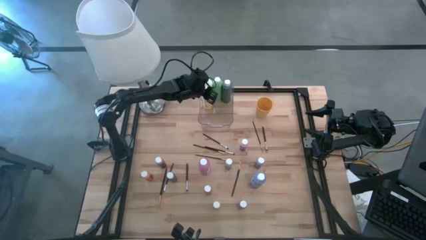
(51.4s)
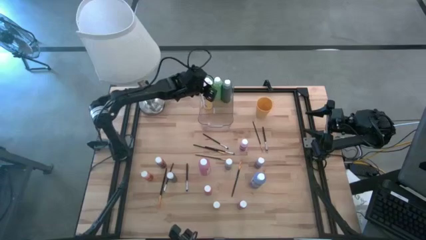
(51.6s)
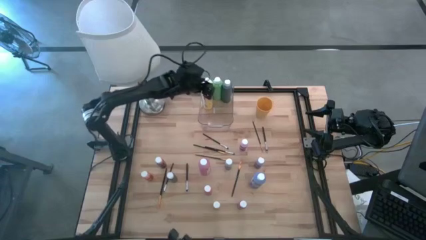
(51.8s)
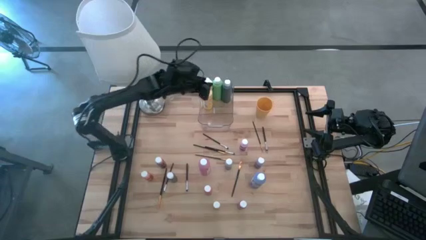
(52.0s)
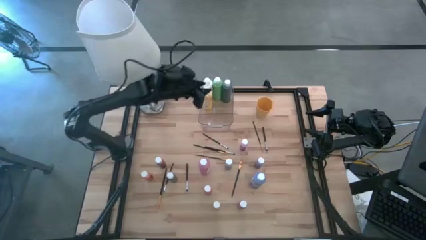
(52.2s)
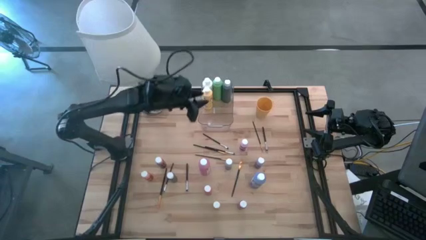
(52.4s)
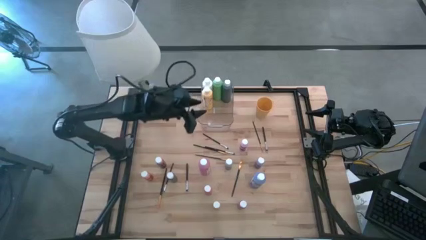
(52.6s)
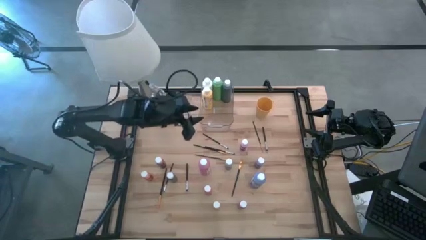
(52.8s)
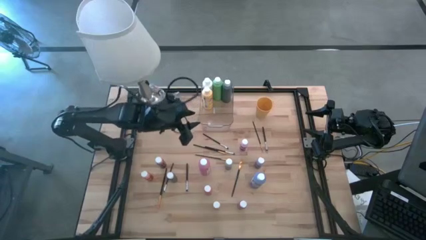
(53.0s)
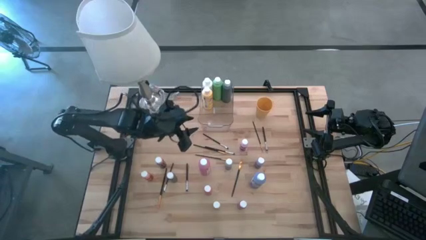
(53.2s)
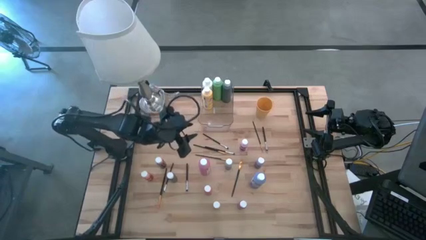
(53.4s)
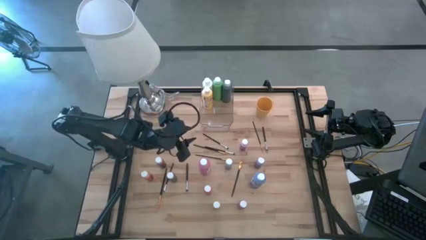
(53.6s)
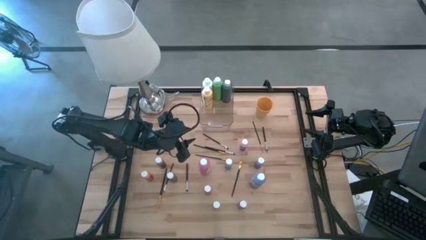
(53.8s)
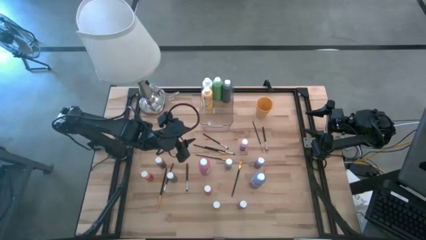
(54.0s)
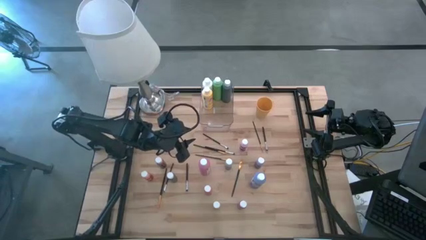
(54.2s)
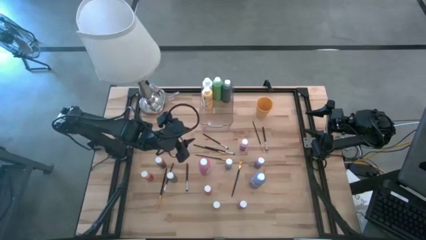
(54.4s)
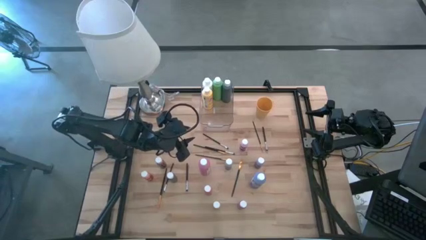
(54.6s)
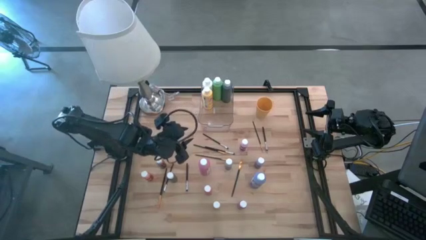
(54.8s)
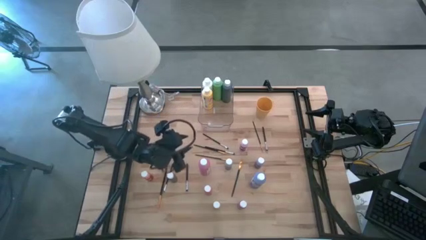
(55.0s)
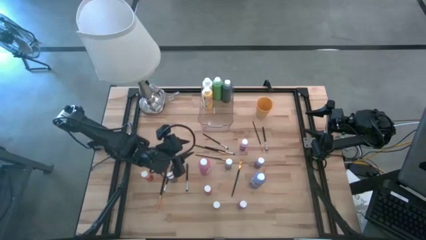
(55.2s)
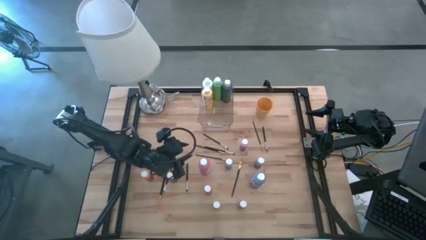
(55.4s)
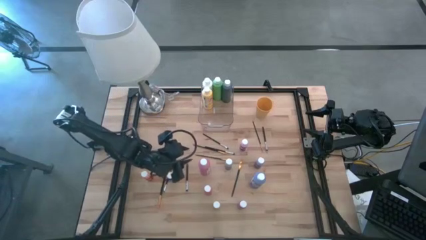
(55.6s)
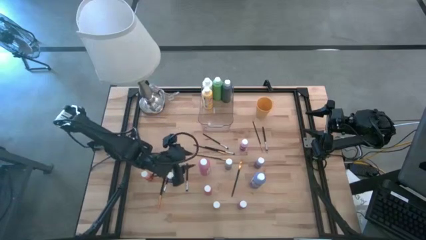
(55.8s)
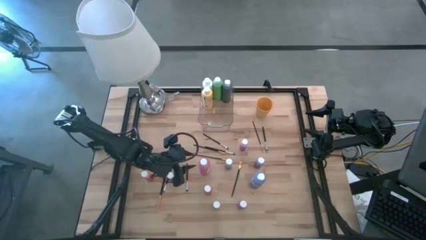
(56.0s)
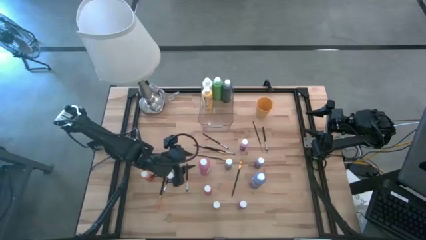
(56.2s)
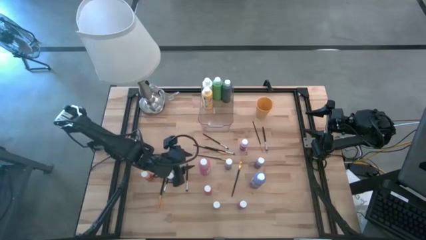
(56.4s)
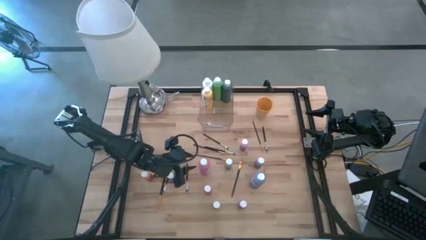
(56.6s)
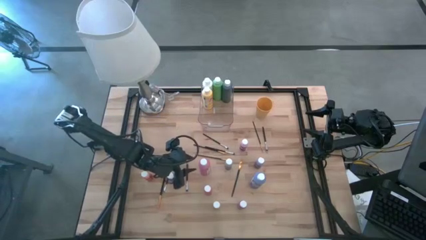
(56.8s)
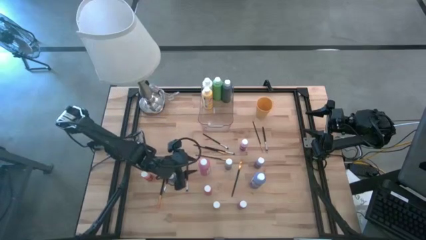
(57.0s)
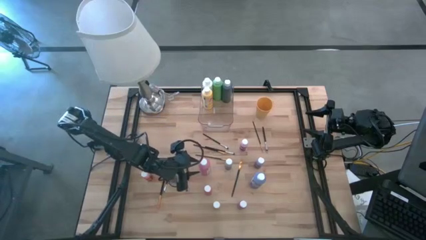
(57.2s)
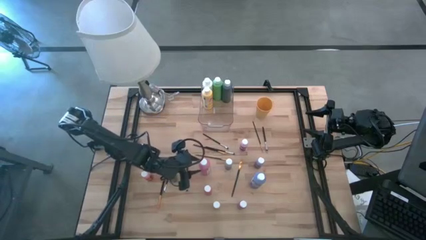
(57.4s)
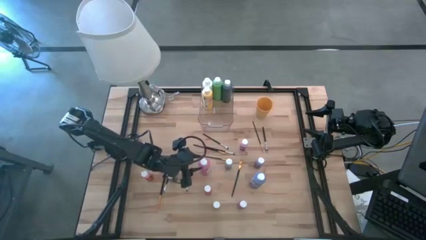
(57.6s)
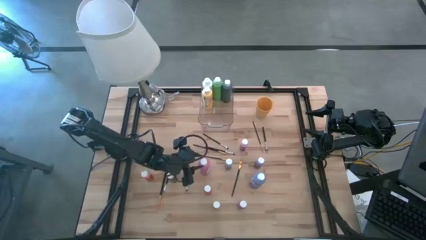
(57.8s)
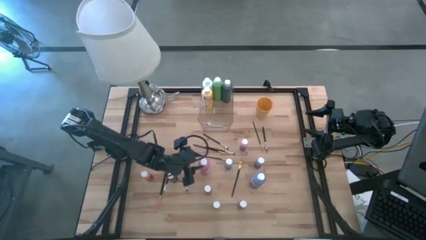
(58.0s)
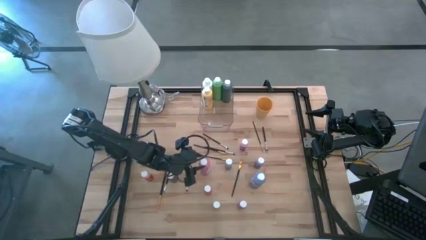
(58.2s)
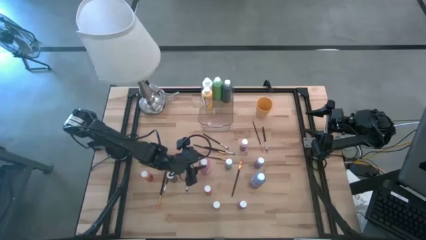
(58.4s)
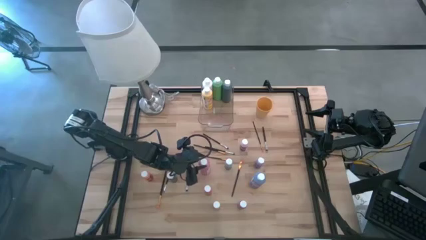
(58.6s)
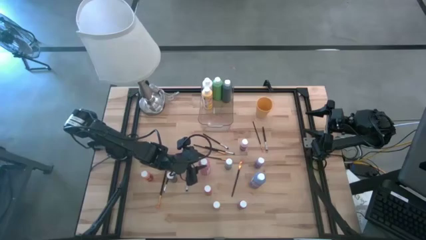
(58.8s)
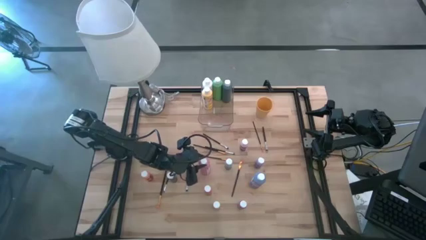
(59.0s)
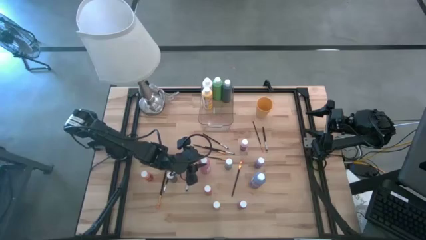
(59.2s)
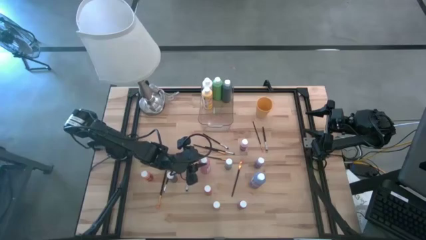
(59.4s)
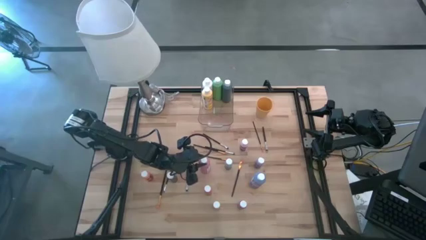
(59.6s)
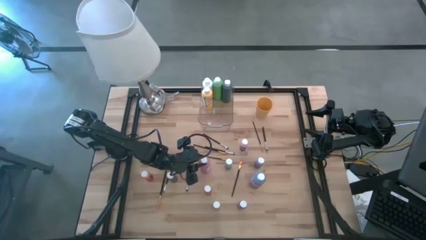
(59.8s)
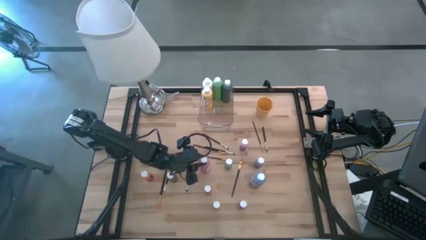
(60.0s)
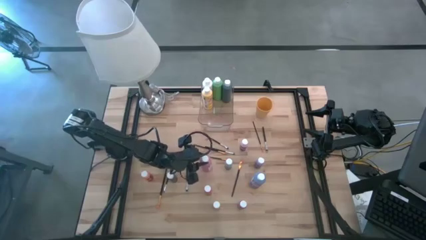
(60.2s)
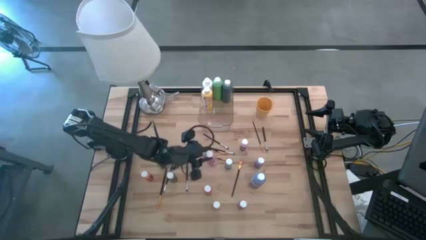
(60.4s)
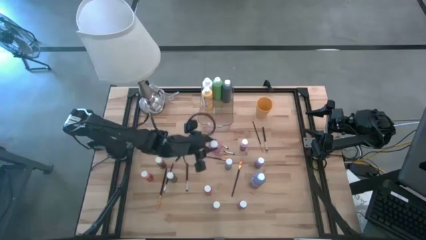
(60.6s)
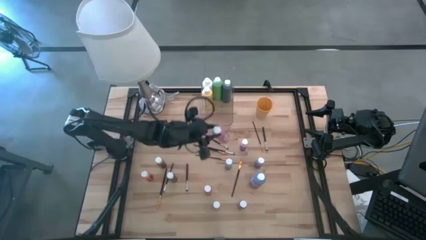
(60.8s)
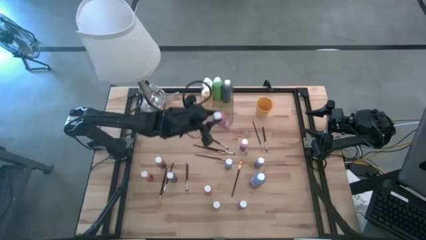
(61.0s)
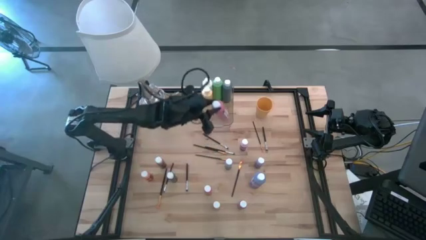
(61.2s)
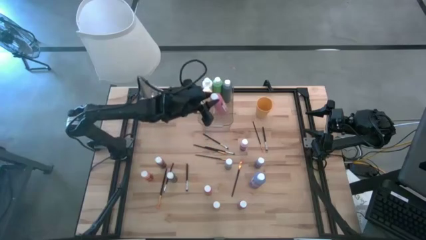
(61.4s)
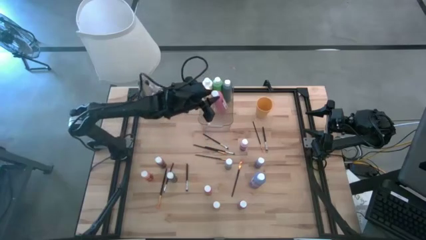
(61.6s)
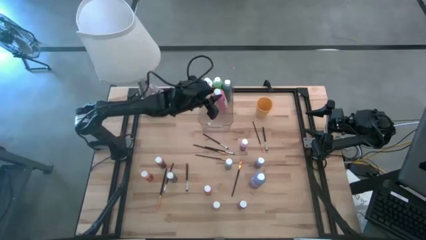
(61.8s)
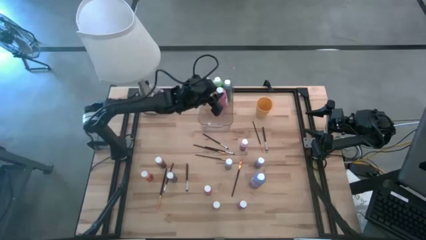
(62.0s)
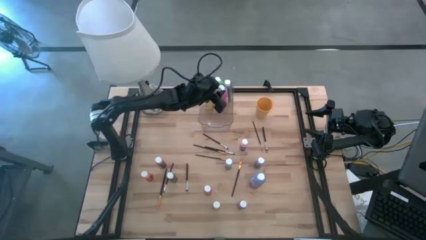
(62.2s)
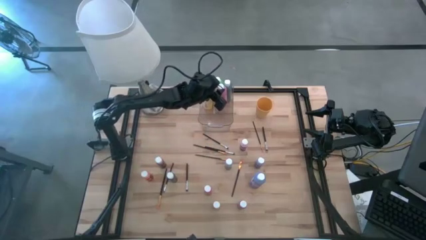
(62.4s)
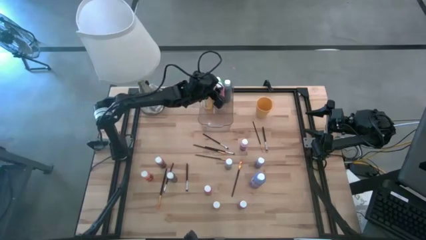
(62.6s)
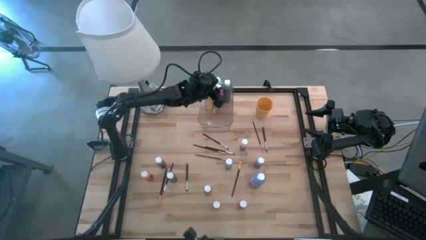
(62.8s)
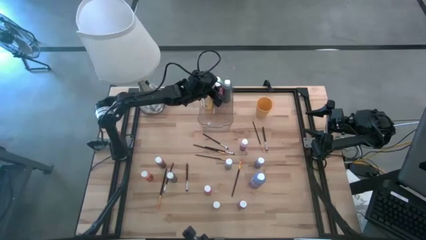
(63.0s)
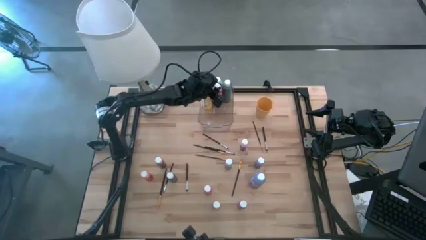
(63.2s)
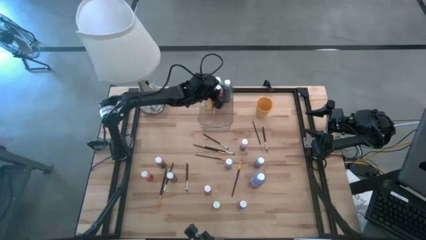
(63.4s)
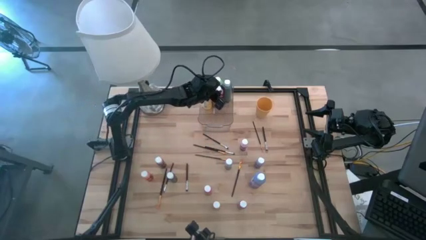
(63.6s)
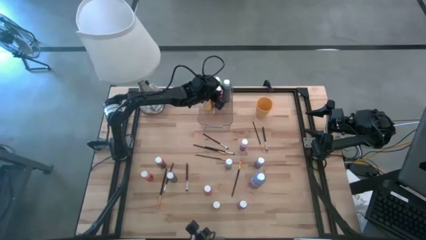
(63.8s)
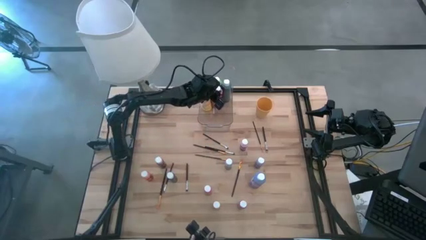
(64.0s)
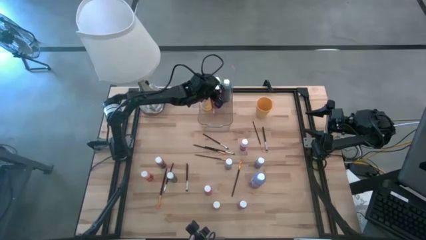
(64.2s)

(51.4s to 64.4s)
Task: Pick & Place Paint Supplies
Put the big pink paint bottle into the bin

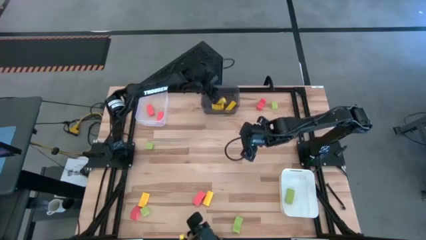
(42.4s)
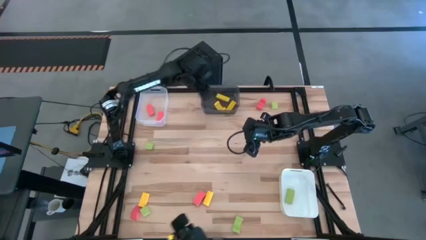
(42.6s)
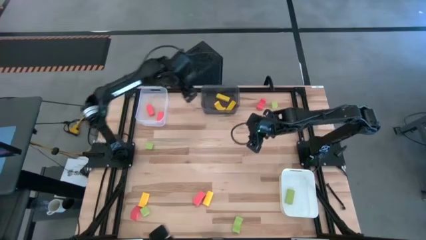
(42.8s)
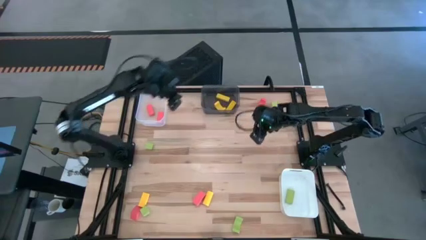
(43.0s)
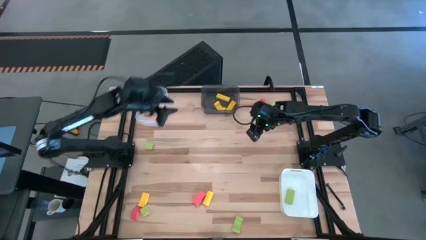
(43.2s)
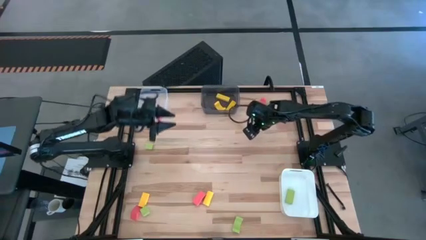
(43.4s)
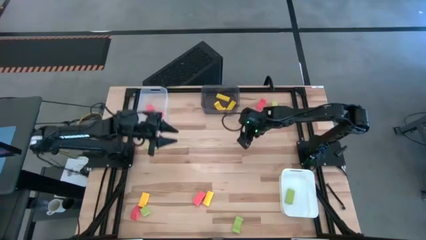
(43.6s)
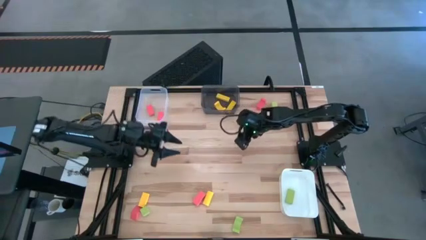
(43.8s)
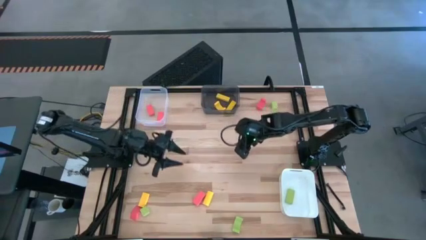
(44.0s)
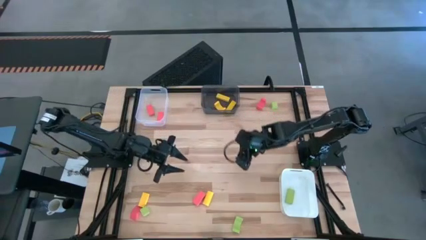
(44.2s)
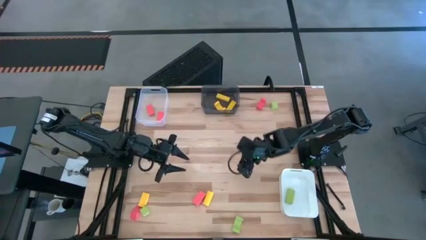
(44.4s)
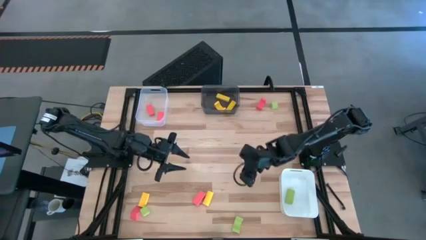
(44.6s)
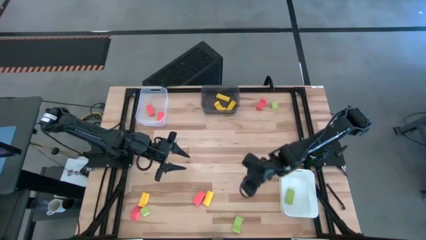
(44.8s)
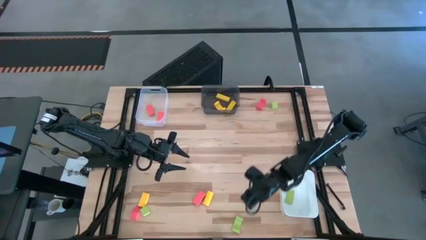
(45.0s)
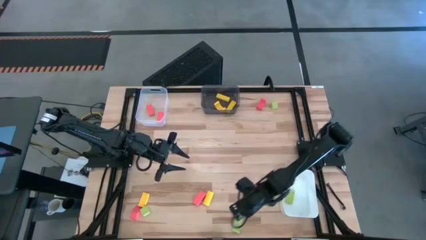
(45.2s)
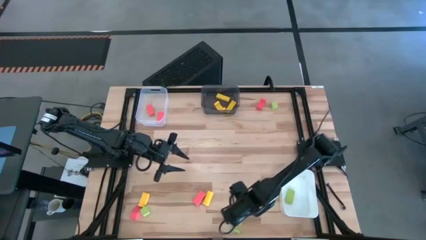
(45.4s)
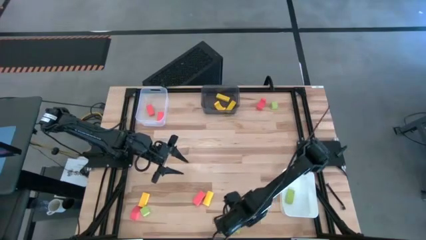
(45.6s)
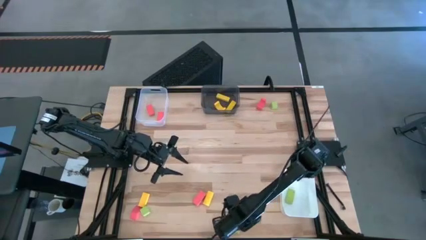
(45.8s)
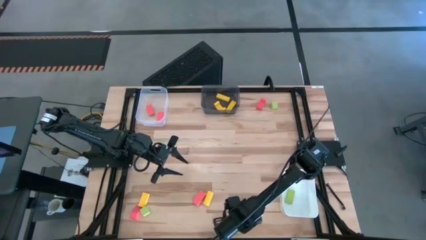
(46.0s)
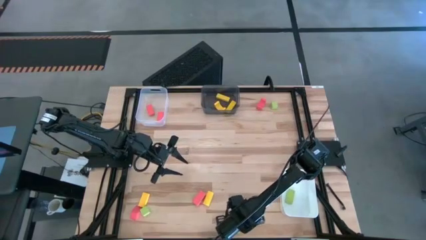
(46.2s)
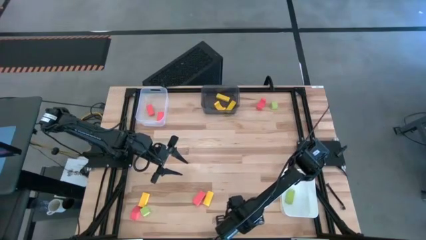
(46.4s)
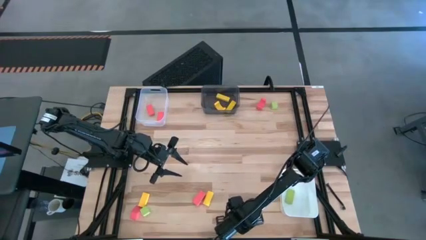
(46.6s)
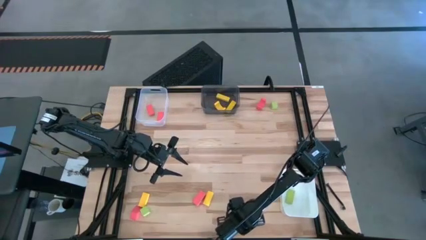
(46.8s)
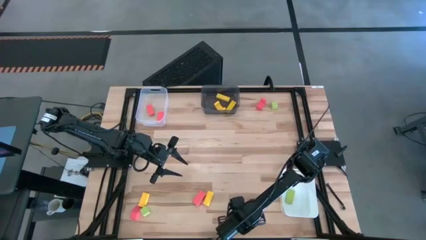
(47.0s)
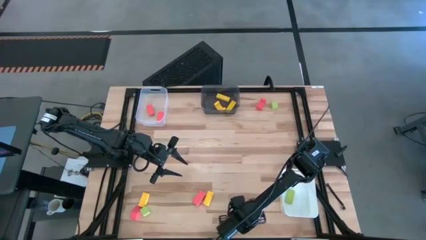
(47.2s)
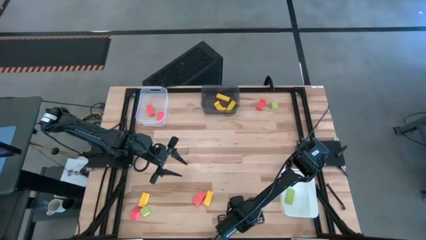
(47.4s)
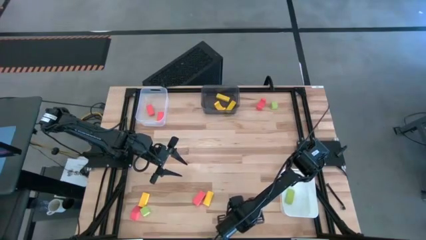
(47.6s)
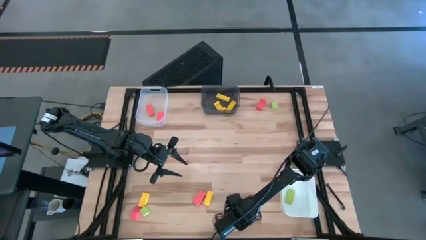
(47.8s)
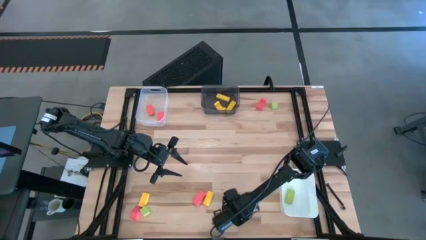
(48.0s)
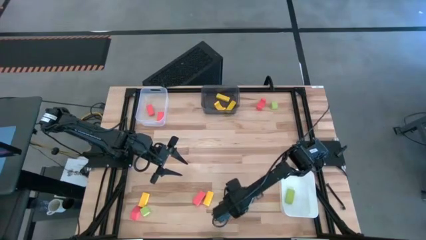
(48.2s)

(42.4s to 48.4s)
Task: Sort & place blocks by color
Put the green block into the white bin
